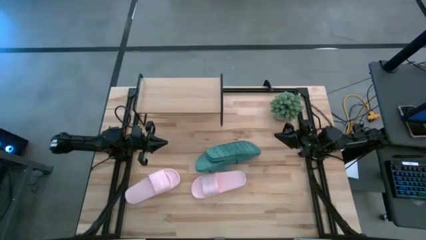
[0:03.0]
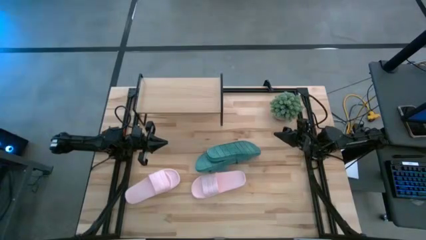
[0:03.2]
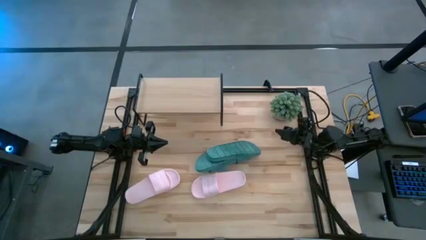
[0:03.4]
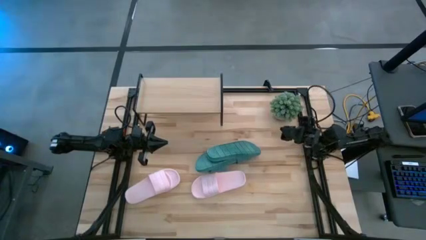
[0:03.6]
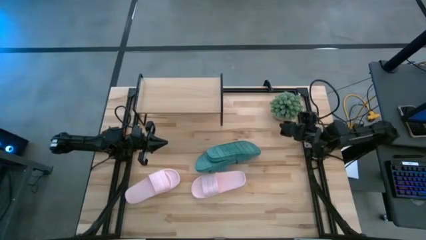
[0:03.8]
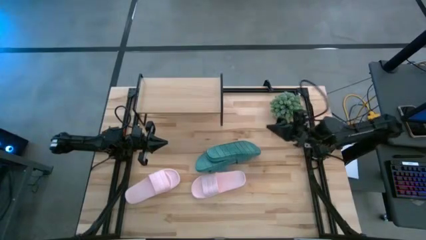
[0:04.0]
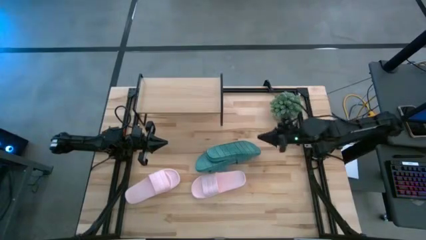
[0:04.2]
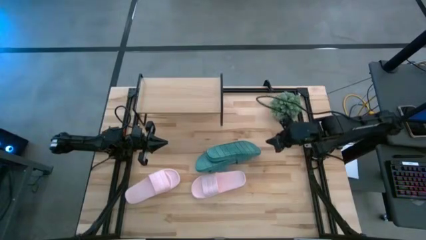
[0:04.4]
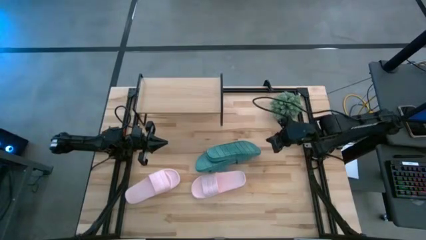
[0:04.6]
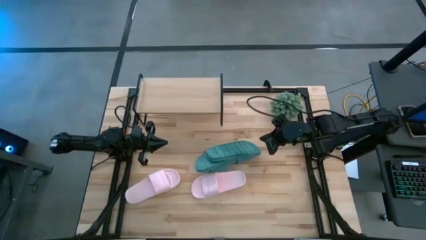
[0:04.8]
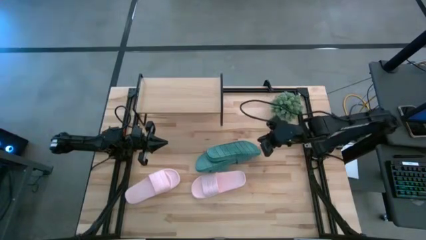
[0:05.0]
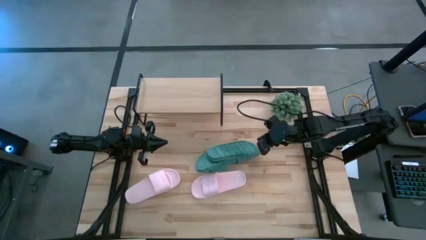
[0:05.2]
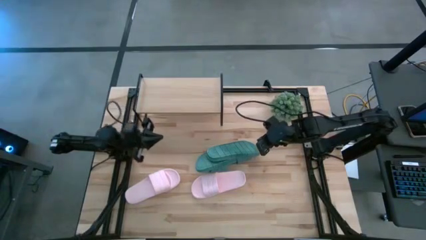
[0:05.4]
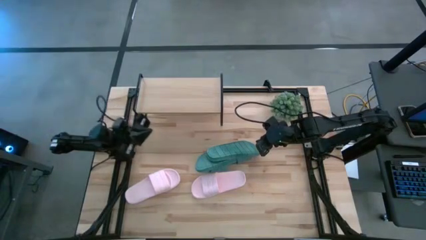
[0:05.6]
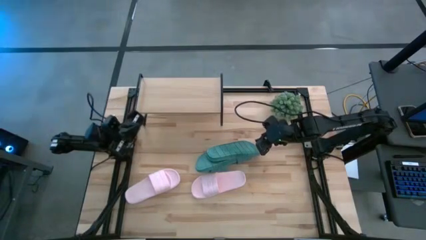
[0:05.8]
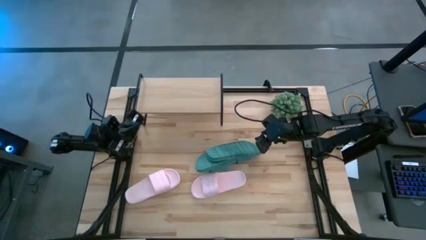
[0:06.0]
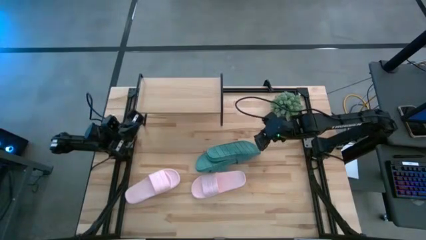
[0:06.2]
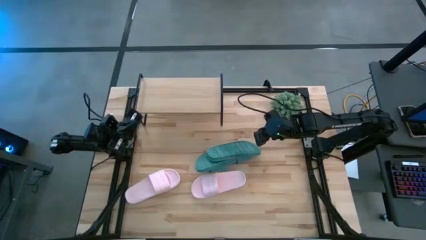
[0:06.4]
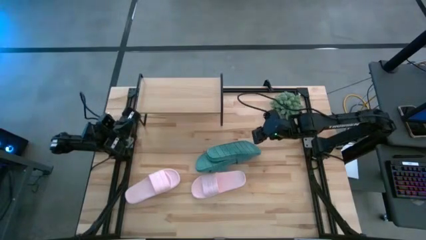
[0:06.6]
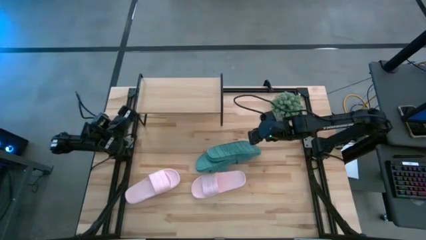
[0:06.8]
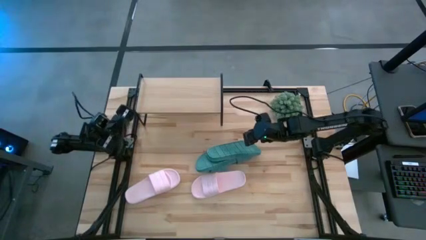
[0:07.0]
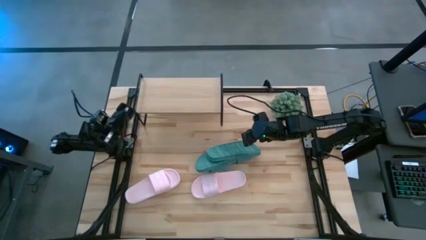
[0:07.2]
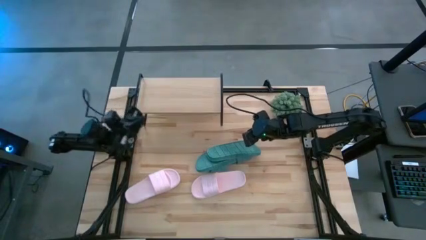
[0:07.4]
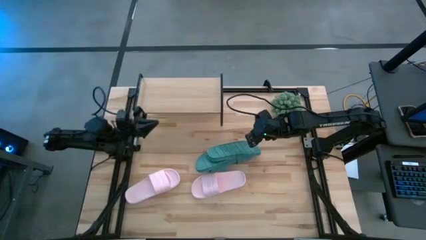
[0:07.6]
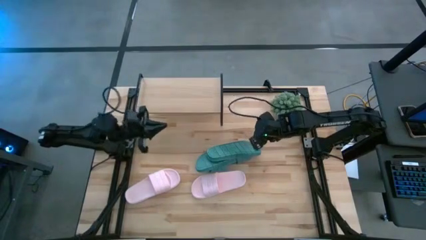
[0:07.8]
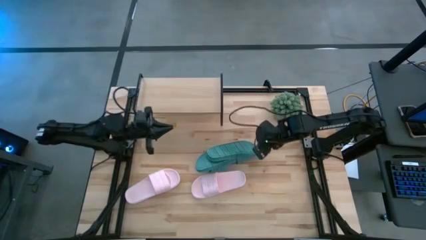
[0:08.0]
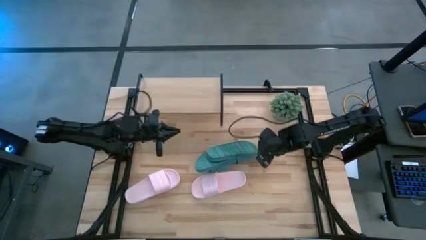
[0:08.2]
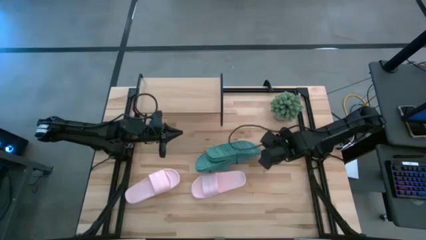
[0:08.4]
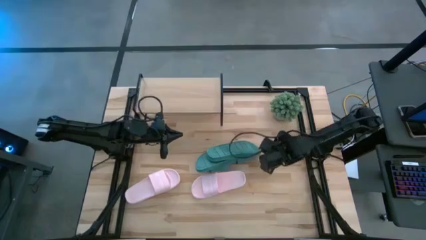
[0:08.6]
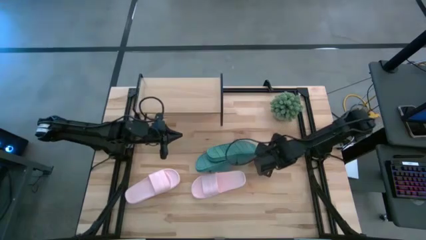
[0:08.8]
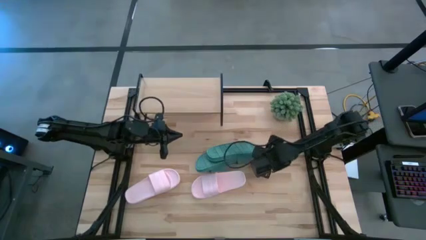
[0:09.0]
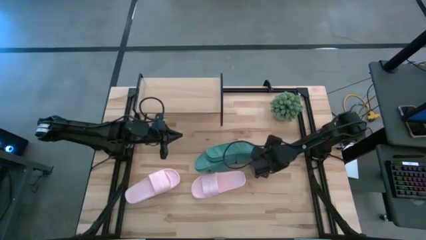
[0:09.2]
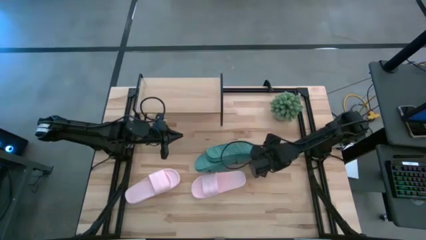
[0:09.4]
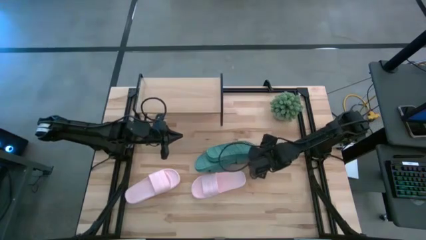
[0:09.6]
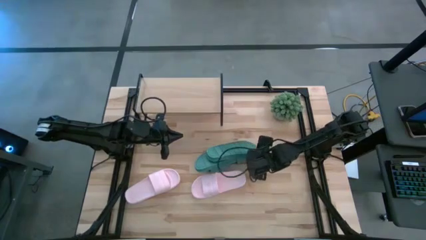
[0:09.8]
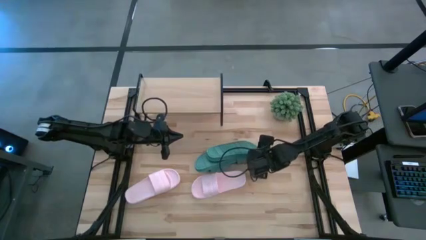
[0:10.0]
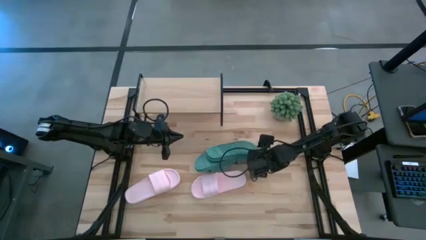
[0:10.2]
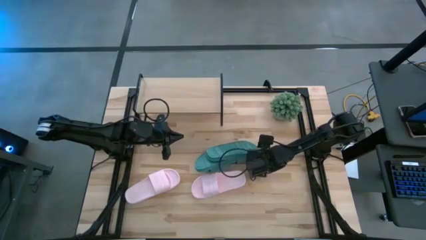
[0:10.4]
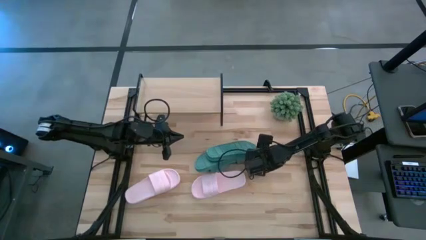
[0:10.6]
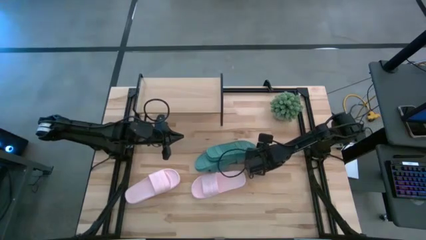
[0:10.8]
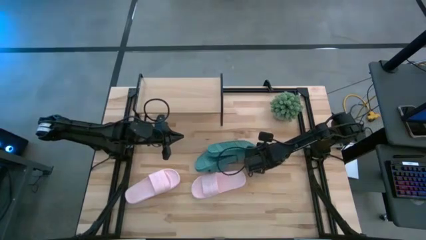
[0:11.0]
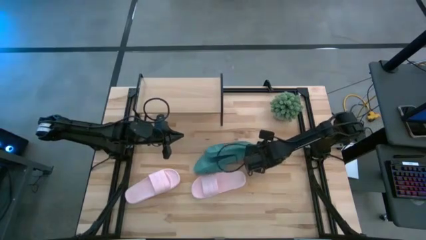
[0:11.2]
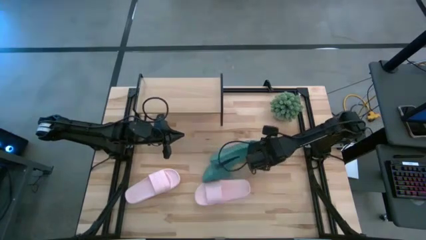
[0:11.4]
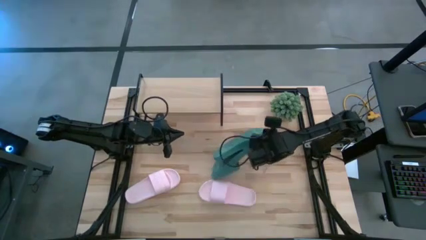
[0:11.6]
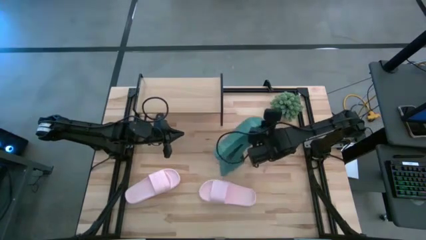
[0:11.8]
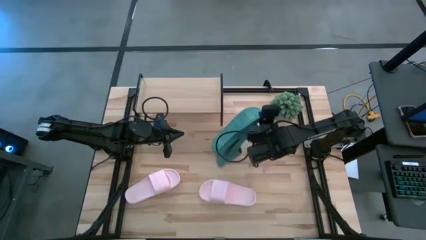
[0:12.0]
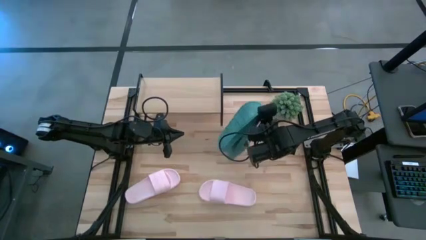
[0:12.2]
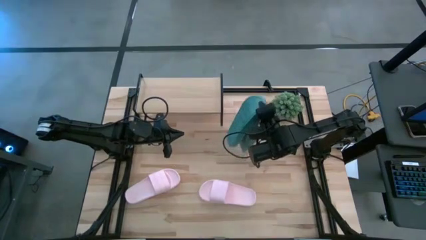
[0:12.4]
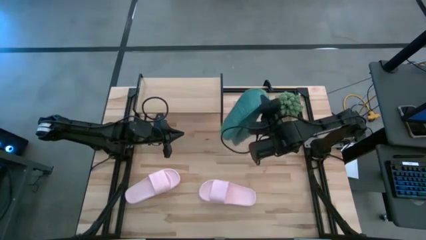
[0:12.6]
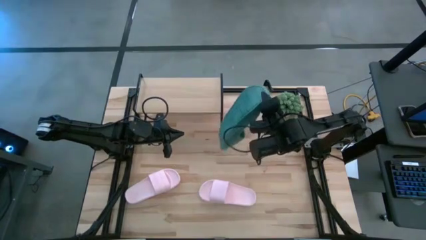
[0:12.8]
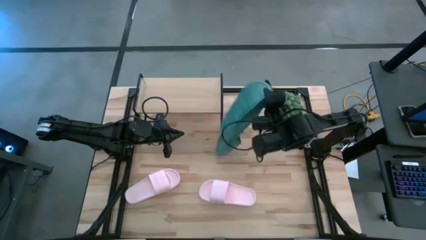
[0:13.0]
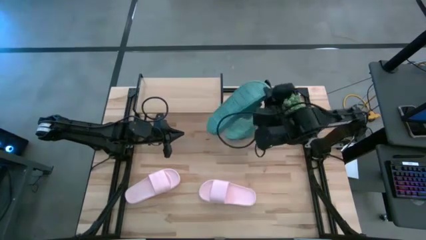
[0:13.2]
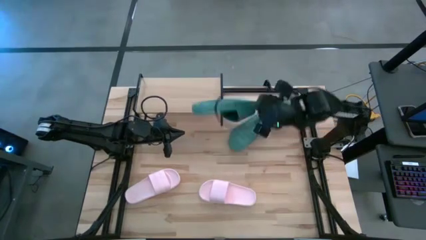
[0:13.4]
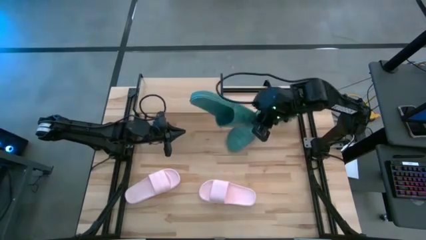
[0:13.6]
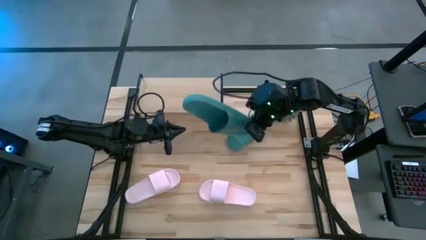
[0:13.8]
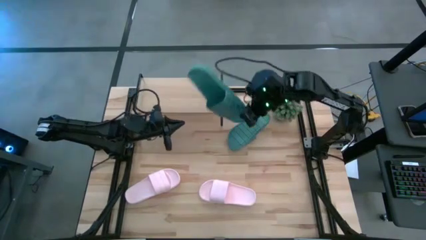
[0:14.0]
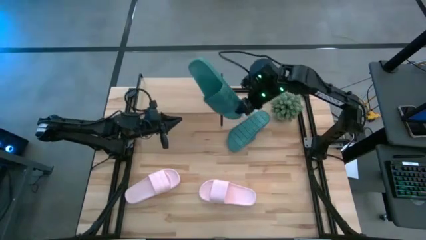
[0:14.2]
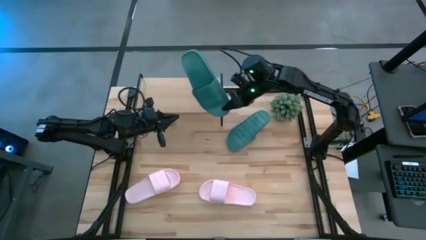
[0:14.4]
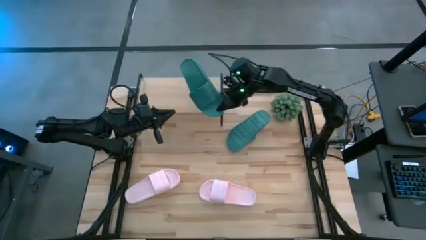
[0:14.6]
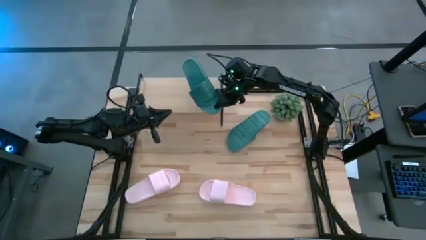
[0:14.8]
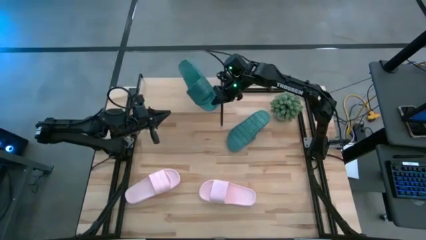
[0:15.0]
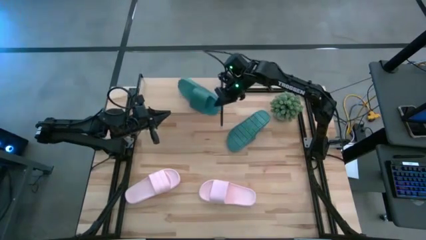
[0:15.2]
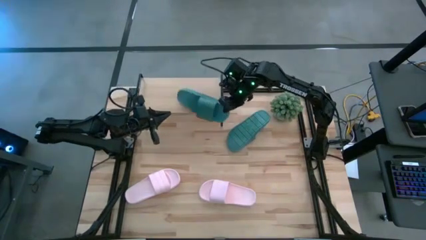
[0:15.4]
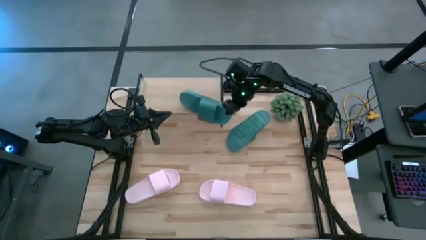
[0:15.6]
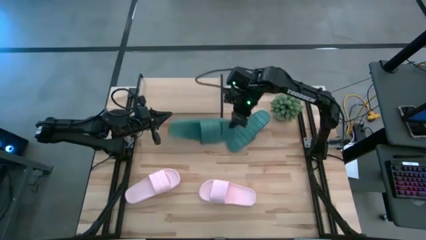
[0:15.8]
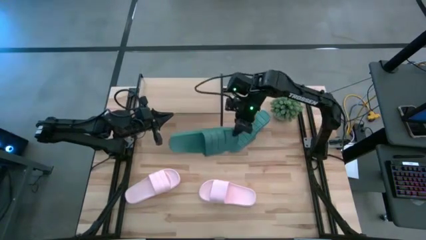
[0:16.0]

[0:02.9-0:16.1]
Task: Pick and place slides into the shelf
Put the bottom blue slide on the shelf
